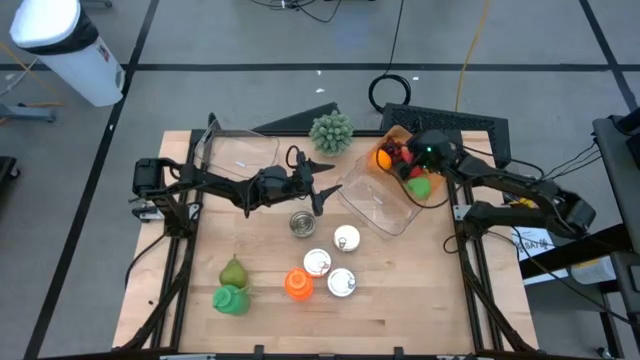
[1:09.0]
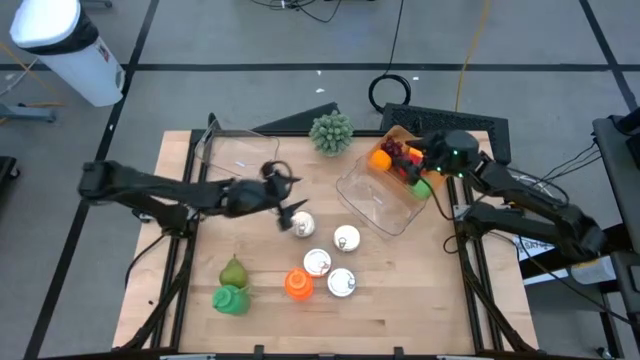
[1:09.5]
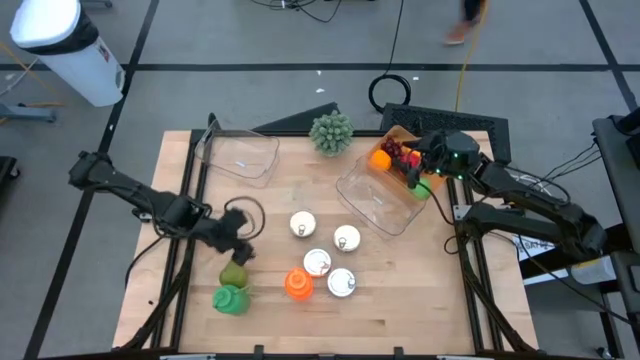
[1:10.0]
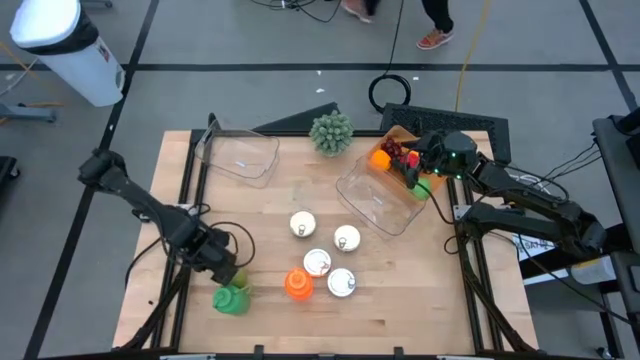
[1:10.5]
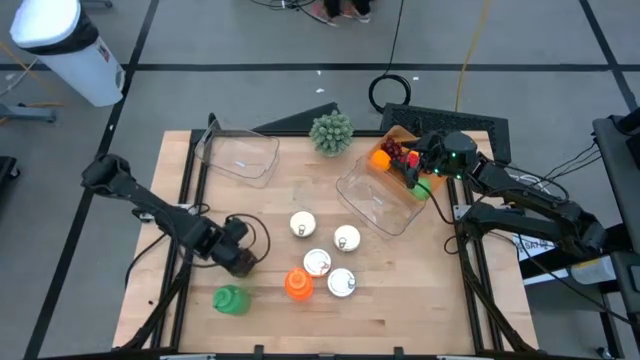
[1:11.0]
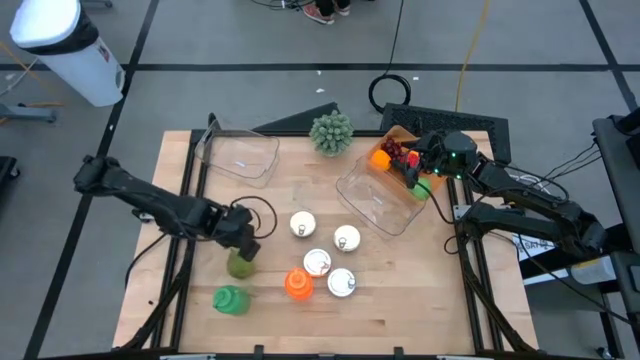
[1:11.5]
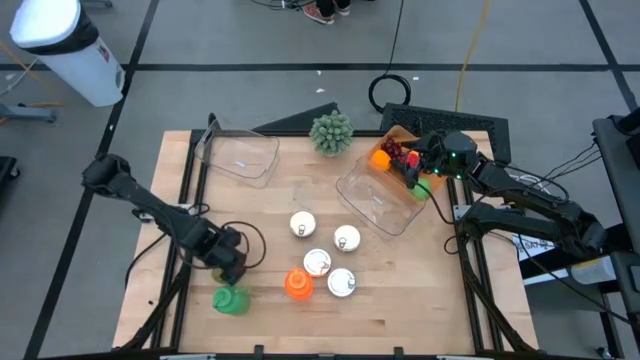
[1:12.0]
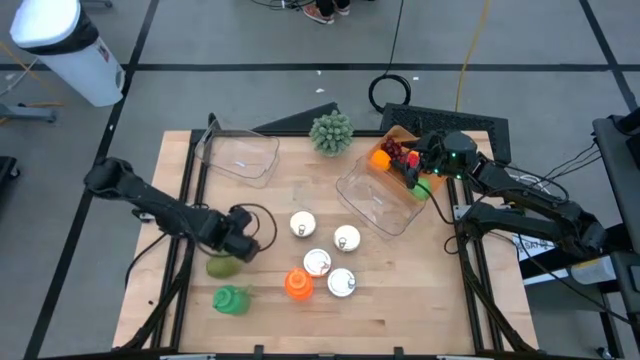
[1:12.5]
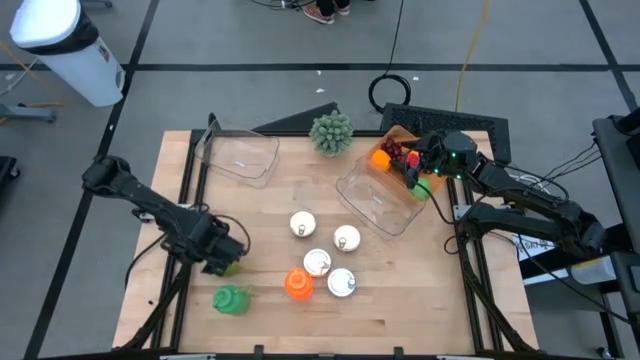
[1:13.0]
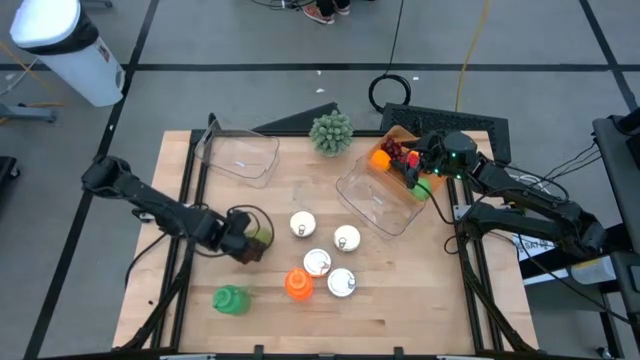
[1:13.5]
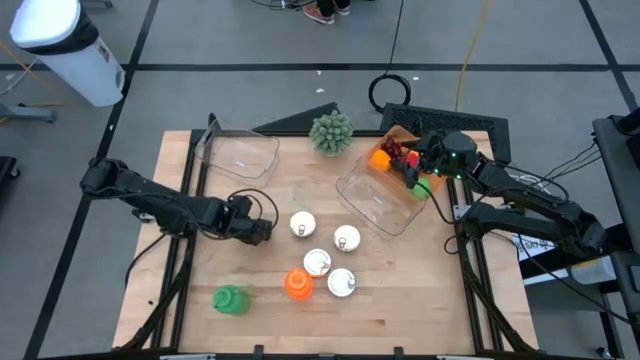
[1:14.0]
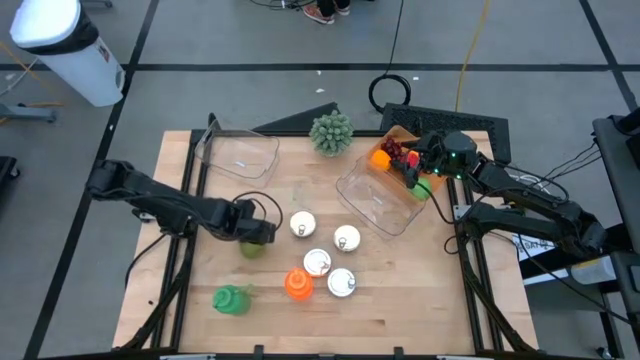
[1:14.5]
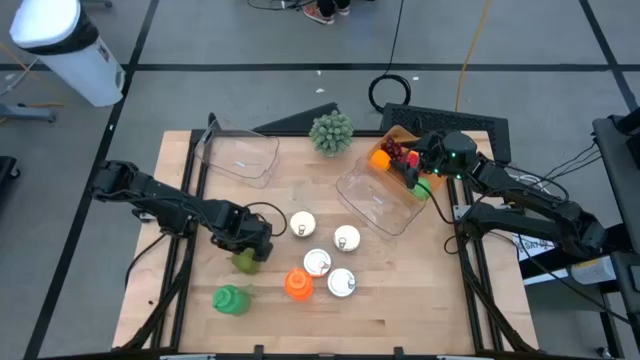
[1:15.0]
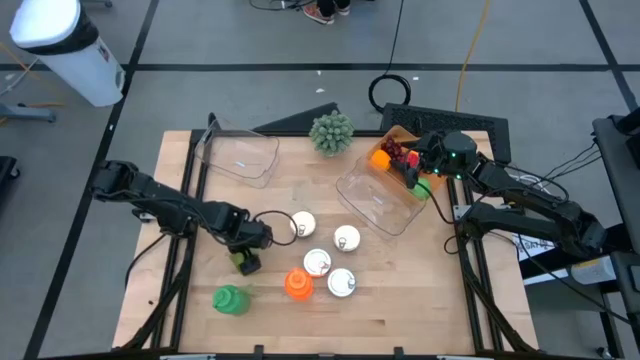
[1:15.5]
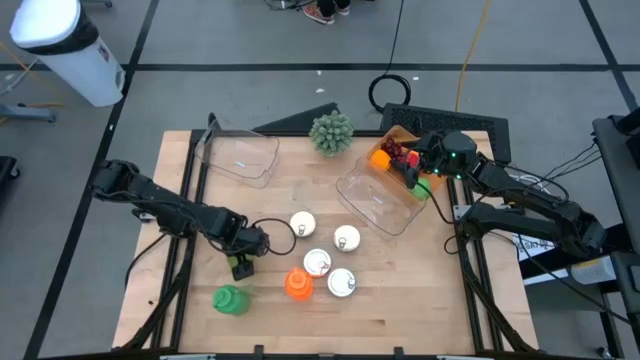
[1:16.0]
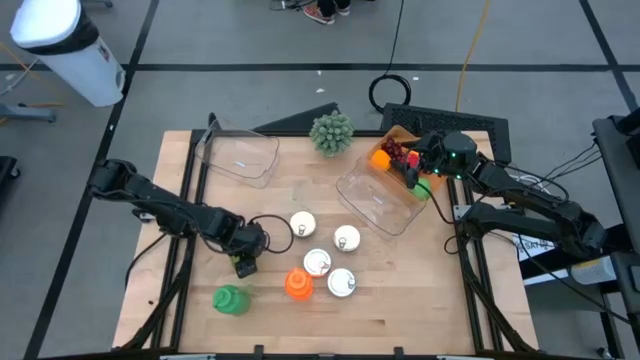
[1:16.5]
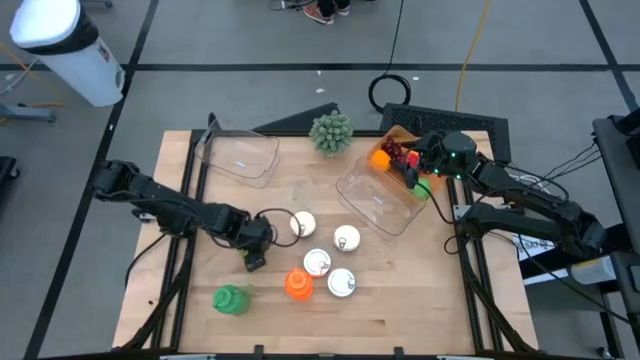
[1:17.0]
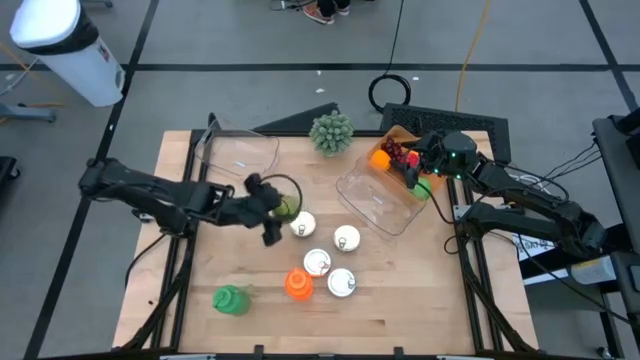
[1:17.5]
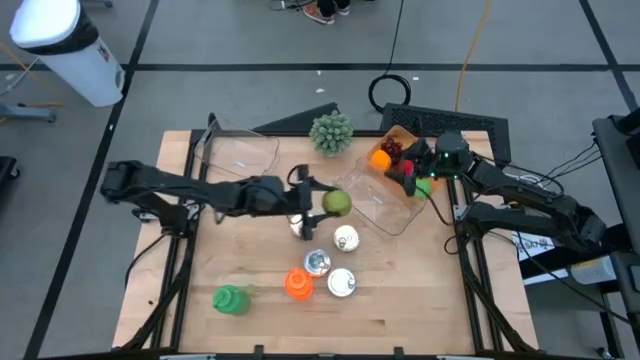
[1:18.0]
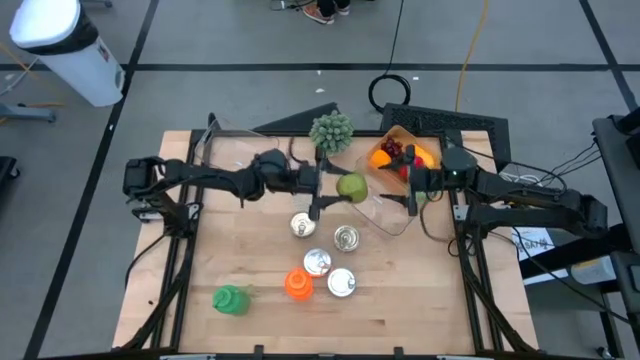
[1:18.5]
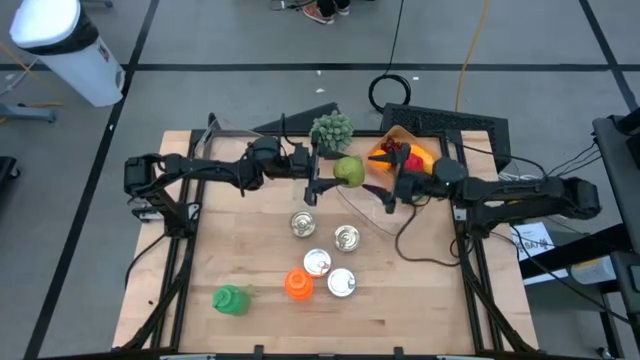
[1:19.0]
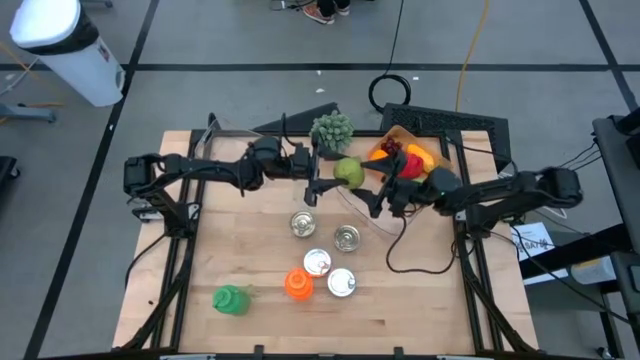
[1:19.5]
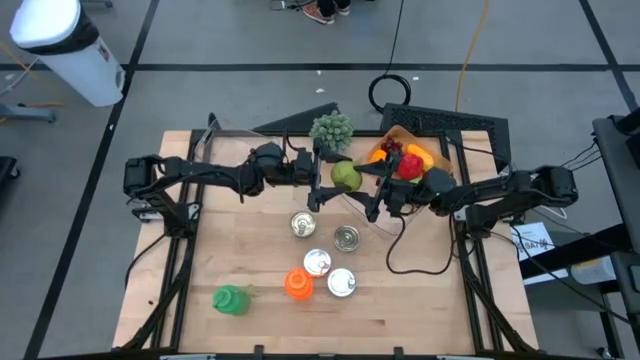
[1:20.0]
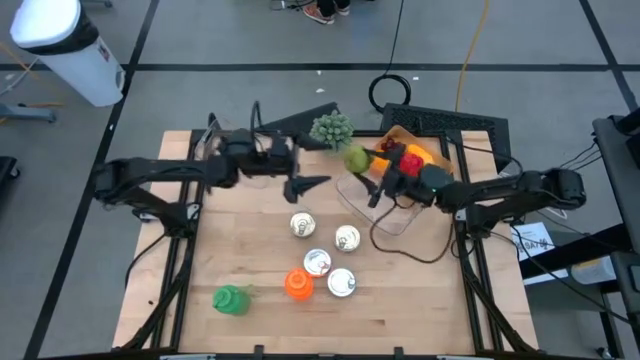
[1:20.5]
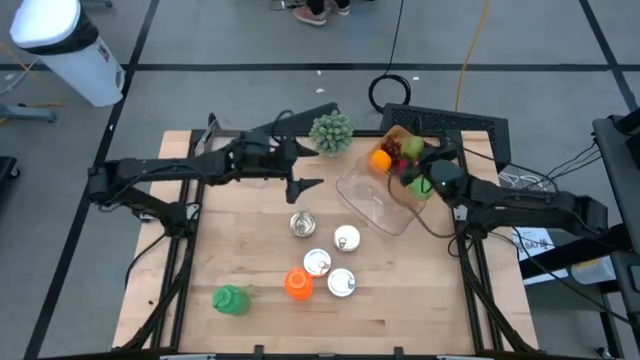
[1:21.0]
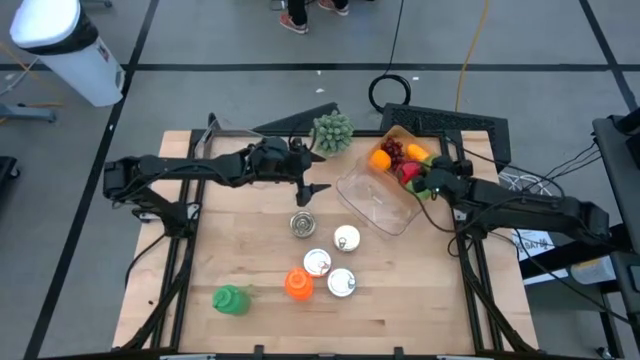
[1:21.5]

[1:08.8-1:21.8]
Task: Pick & Place Food Item
Put the green pear into the orange bin

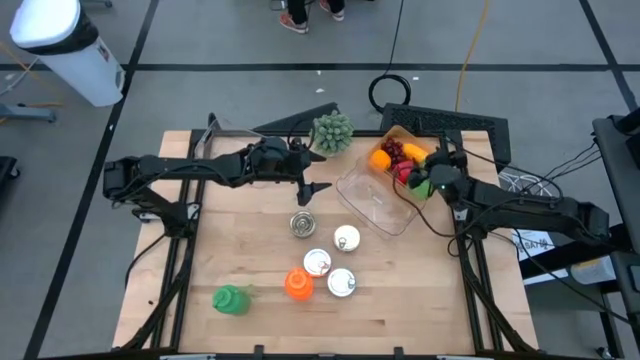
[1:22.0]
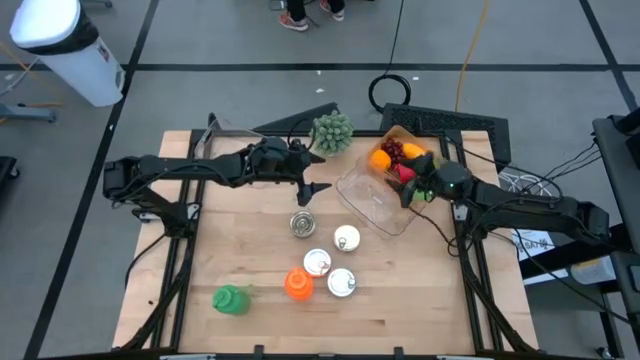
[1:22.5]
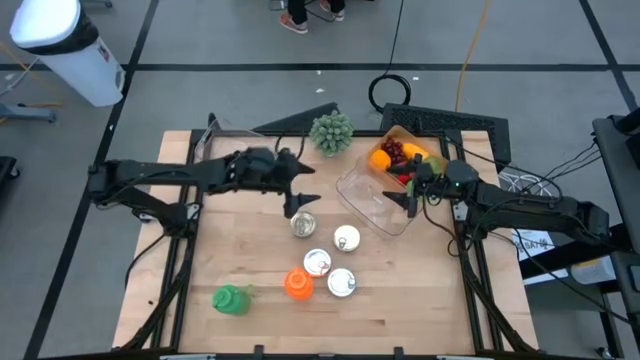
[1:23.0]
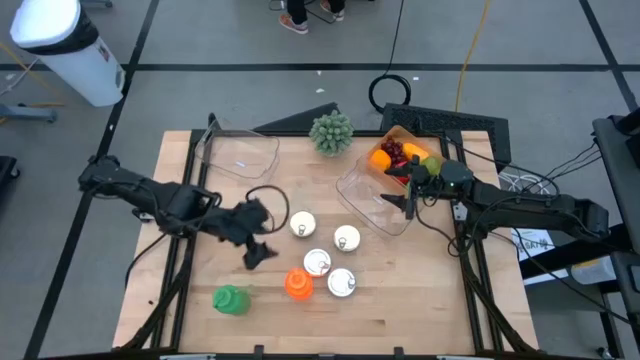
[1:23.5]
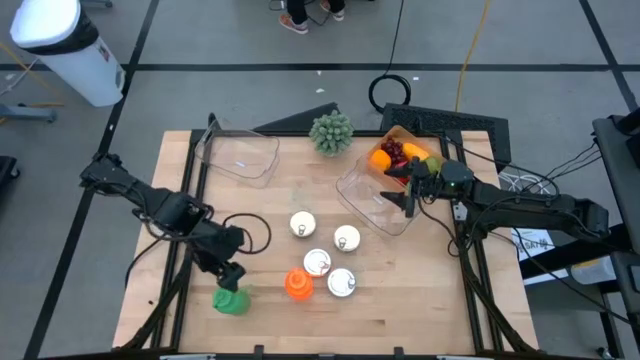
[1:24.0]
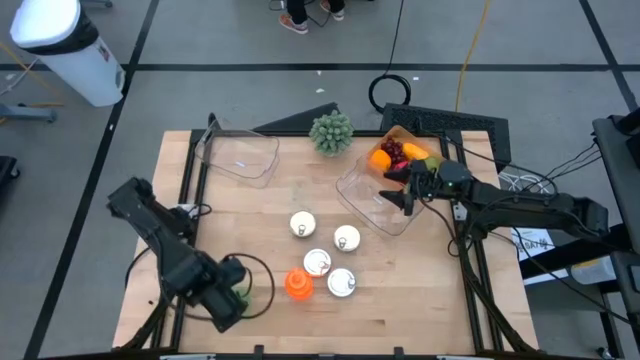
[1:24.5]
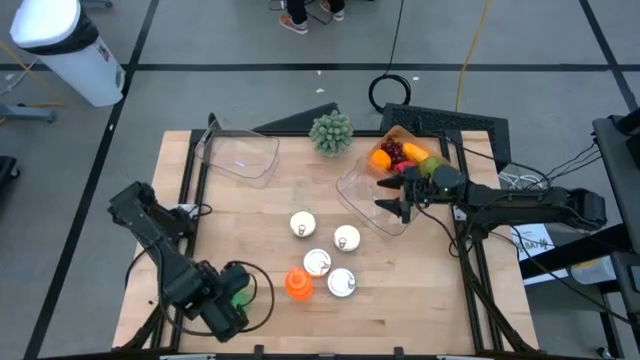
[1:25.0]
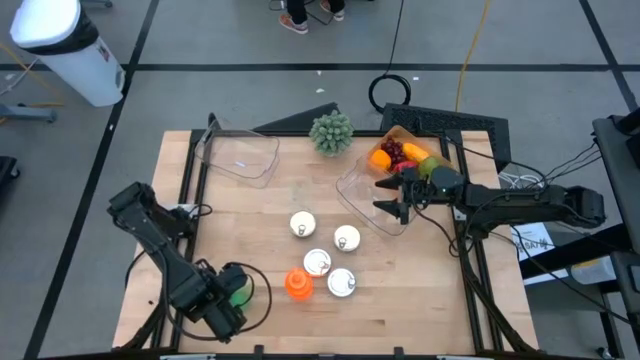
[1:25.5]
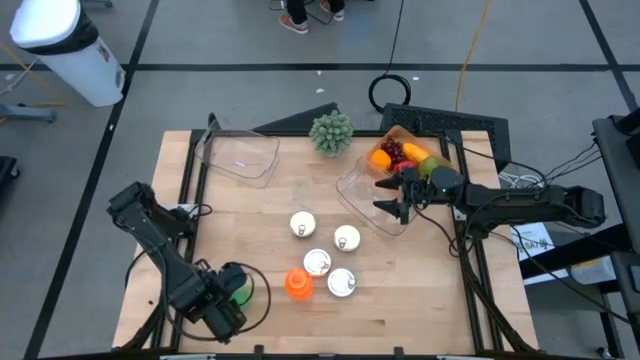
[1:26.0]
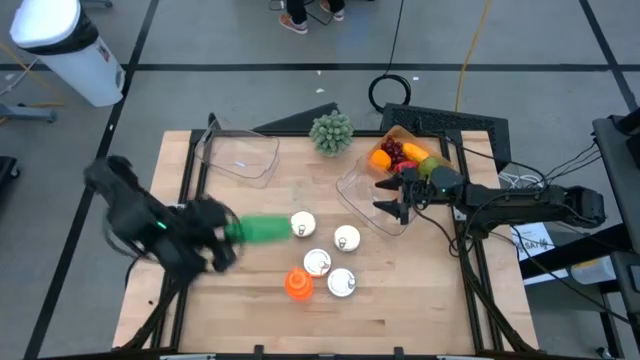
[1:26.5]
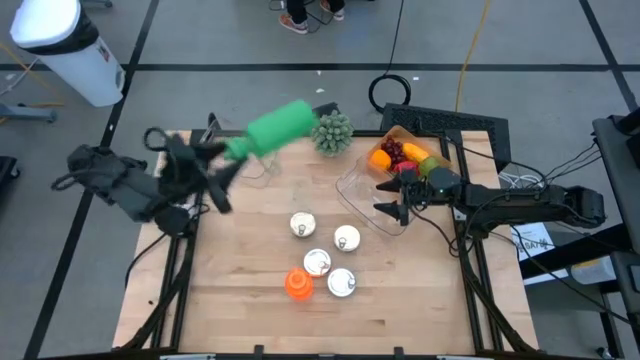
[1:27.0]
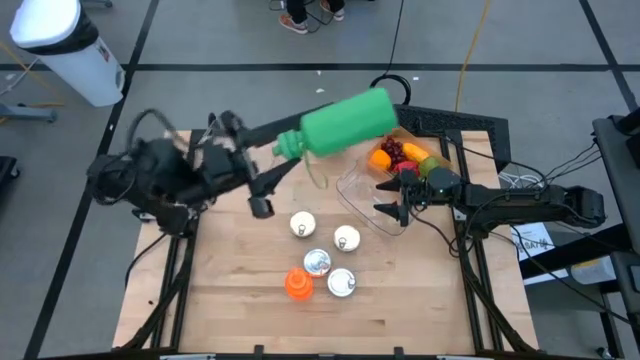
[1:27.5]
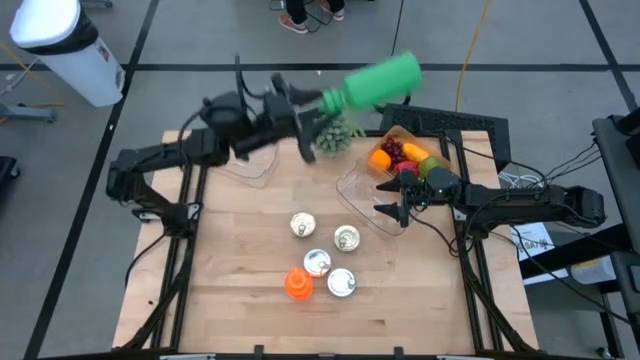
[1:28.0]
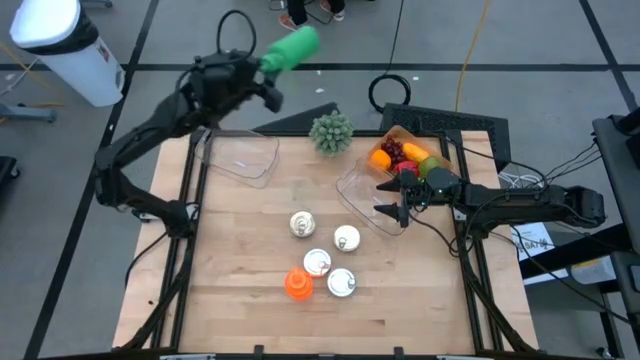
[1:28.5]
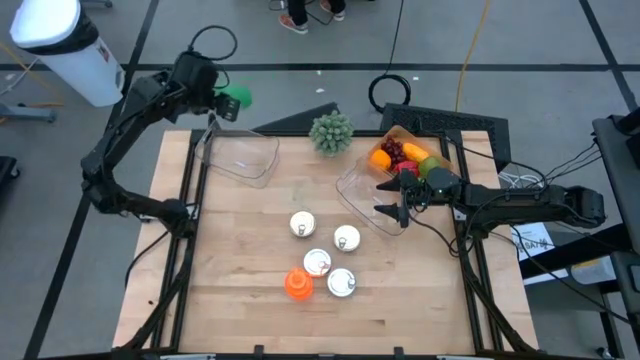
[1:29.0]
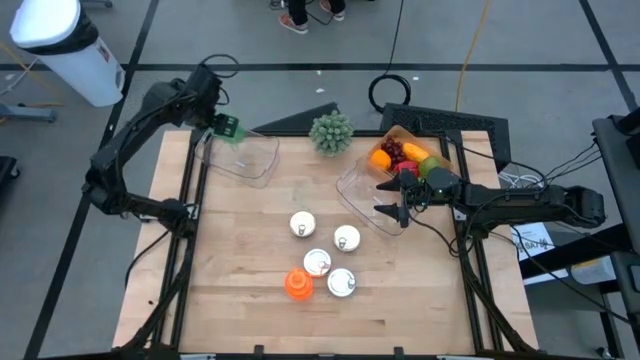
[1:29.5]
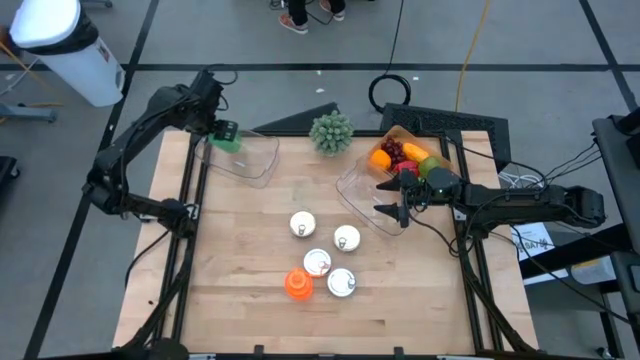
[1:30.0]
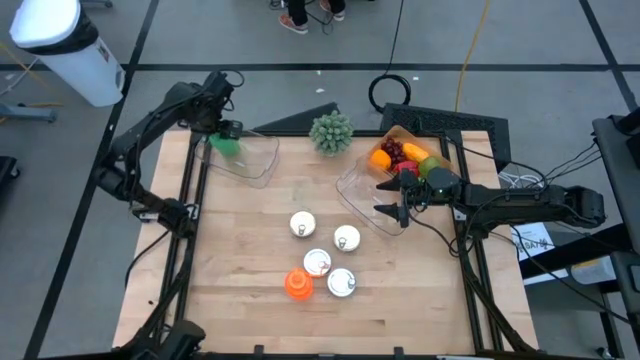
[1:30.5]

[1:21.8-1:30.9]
Put the green tumbler into the left transparent bin
